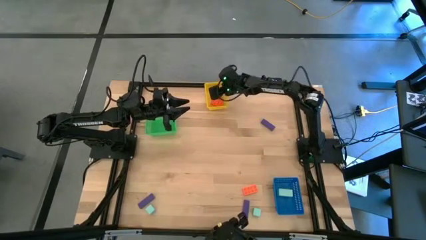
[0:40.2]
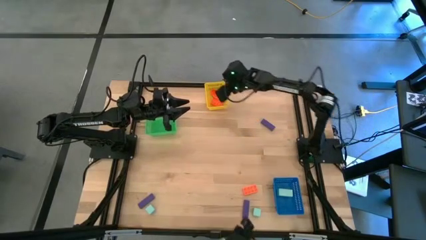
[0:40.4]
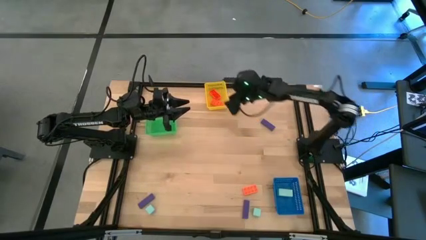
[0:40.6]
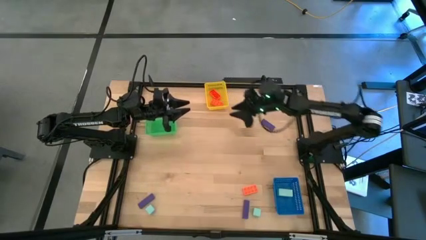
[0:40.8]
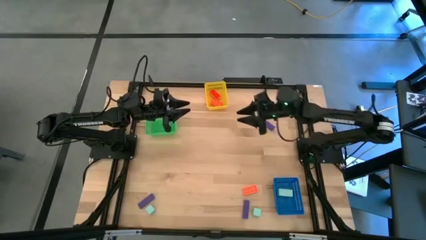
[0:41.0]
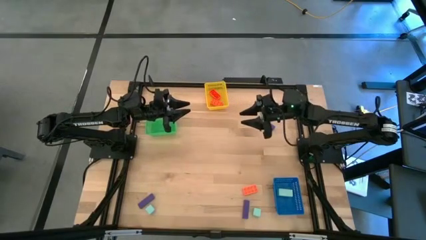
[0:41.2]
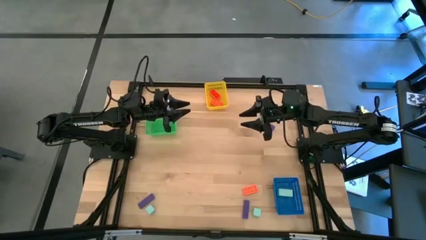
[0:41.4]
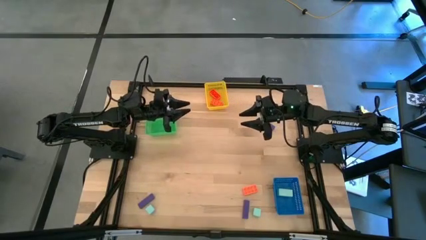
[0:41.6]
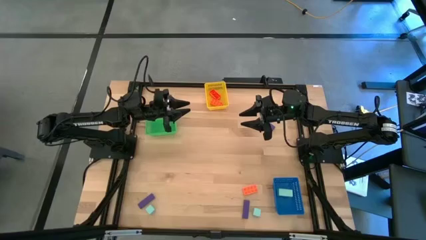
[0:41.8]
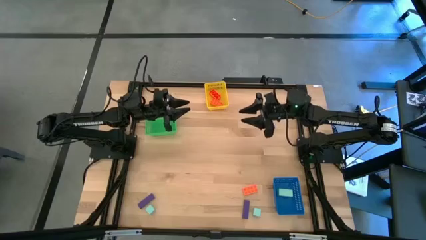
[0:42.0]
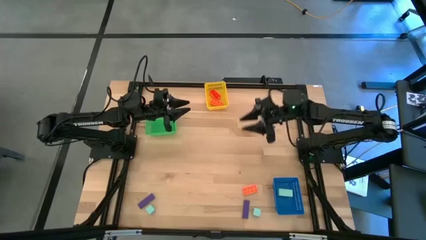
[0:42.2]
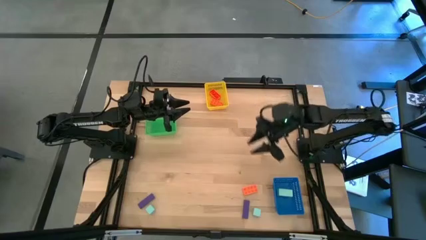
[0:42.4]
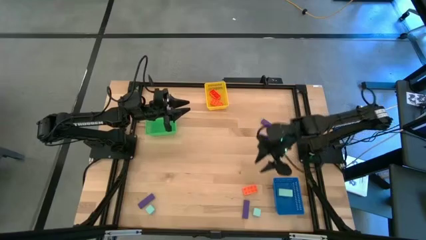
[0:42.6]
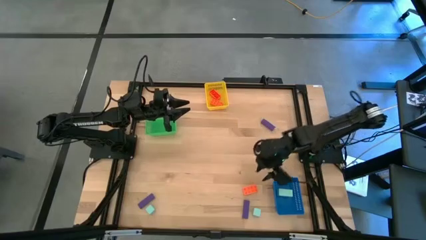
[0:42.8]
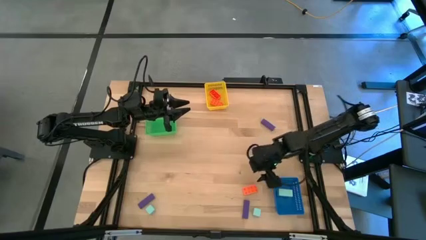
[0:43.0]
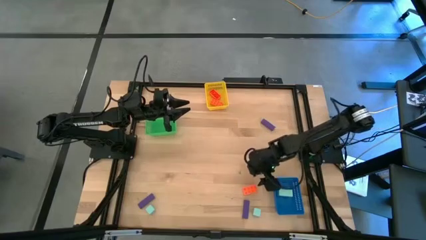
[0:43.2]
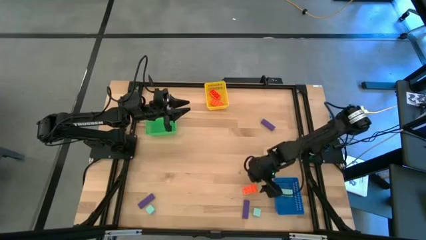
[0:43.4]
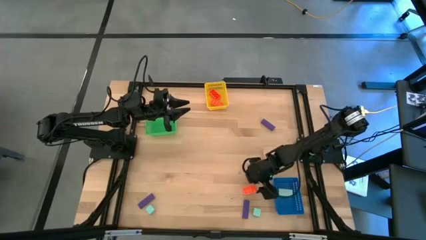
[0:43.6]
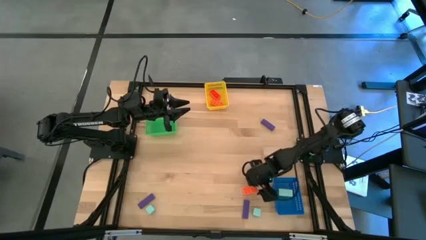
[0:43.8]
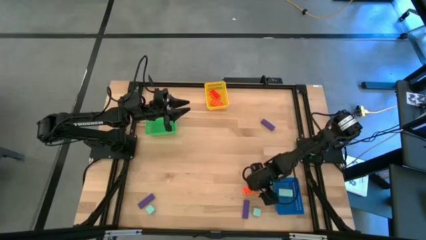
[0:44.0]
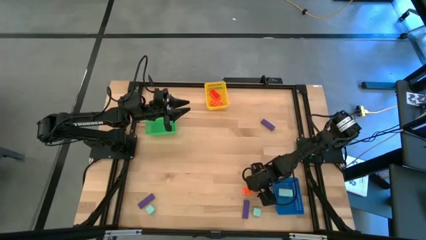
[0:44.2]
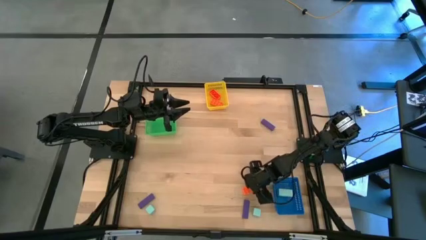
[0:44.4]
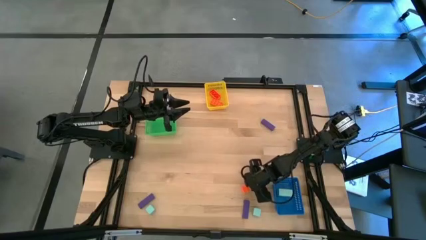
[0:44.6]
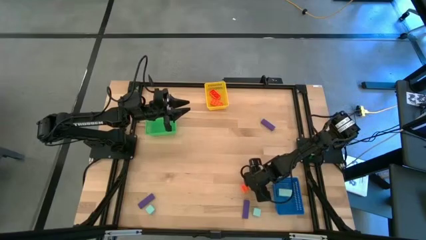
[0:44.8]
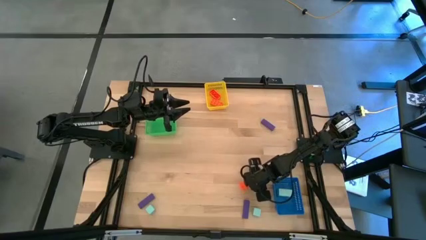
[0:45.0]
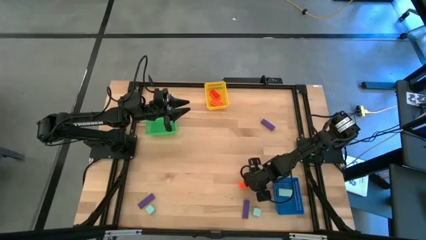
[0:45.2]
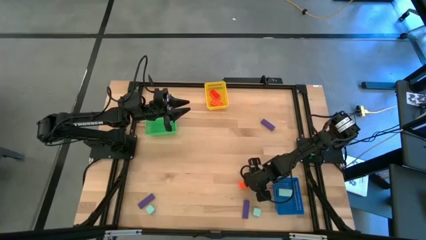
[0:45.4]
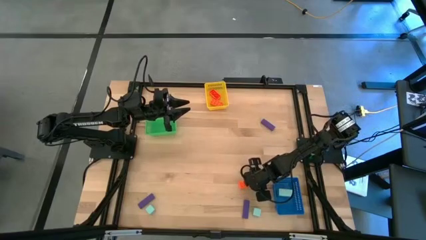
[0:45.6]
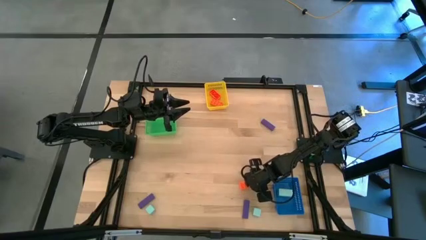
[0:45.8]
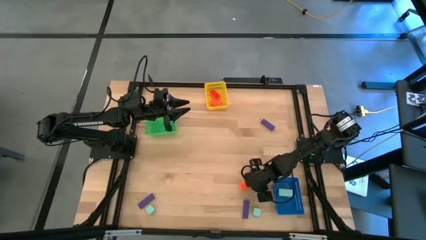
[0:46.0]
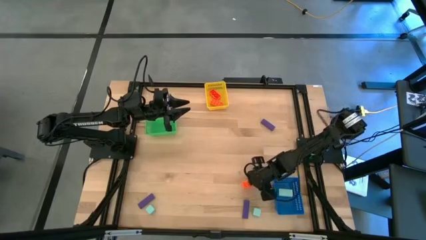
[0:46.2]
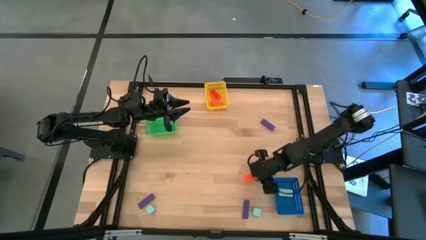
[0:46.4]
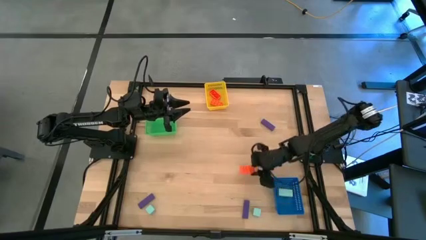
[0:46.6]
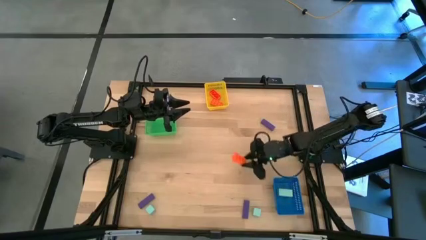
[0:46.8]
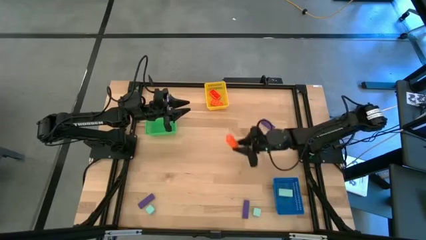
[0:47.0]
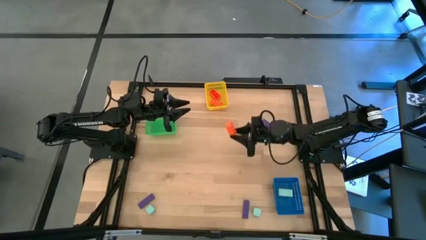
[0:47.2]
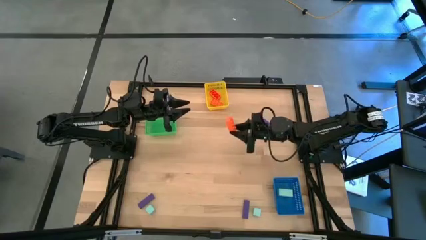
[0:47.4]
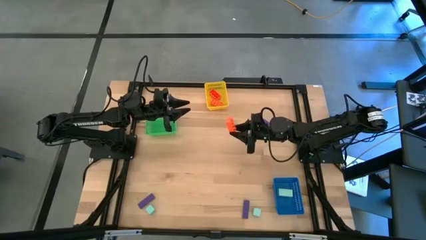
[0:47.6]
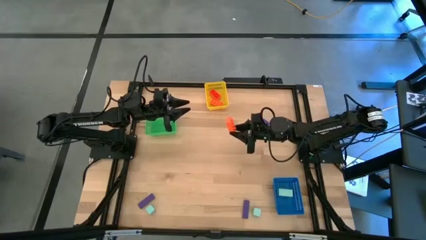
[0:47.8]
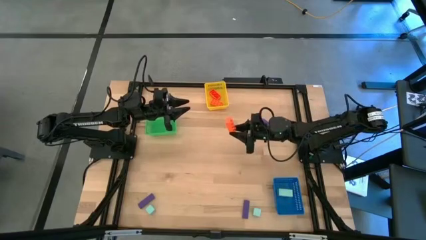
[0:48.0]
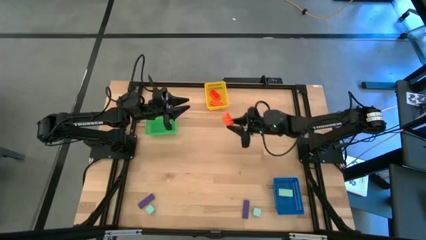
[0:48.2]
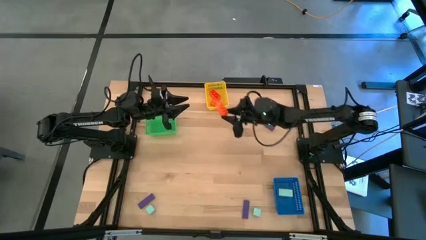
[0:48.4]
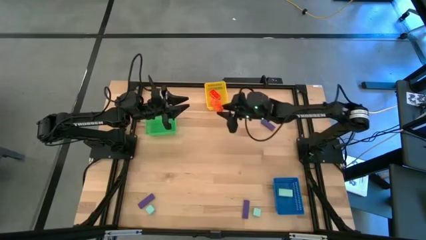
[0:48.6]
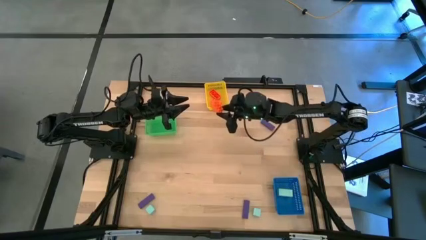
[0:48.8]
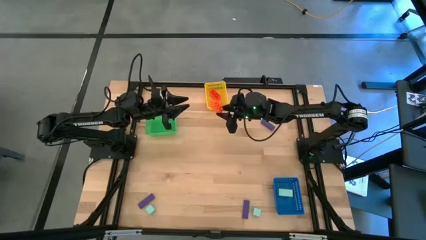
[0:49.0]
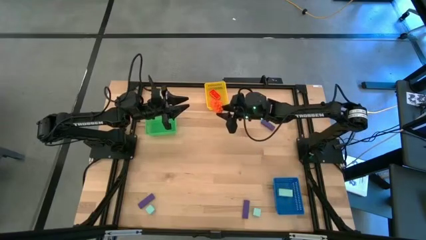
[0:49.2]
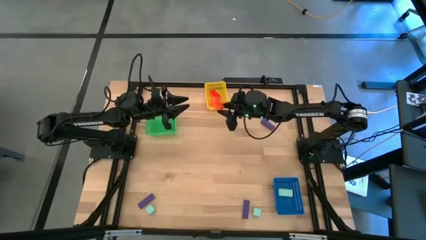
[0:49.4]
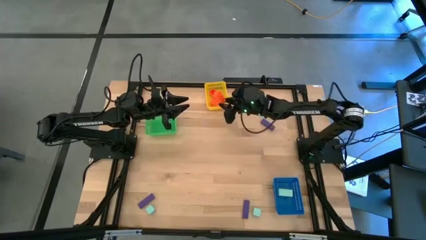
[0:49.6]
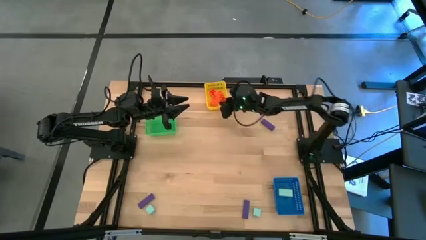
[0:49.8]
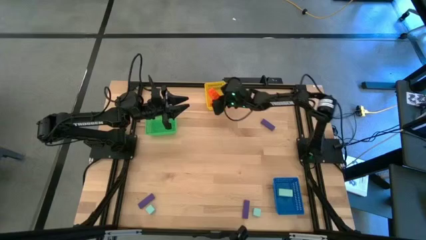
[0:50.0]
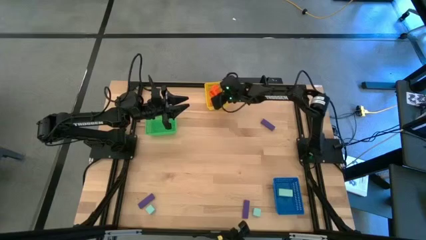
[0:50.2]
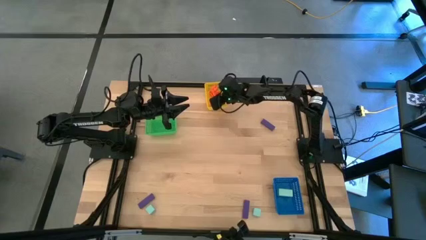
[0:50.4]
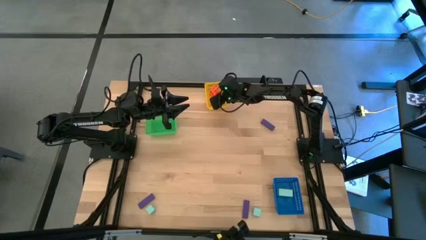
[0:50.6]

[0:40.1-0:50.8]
Task: Sort & place blocks by color
Put the orange game piece into the yellow bin

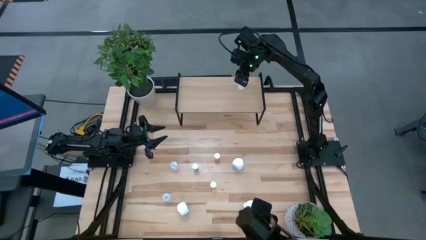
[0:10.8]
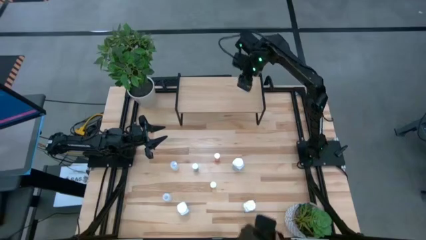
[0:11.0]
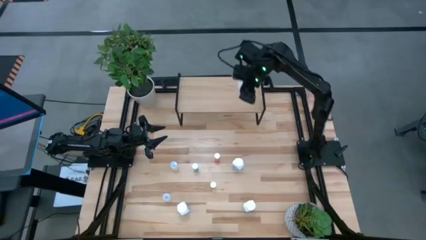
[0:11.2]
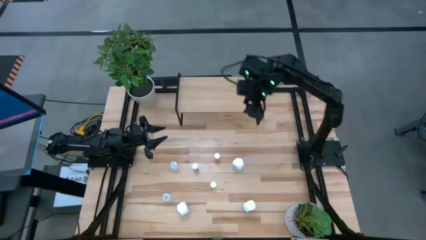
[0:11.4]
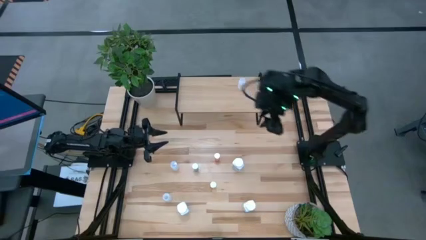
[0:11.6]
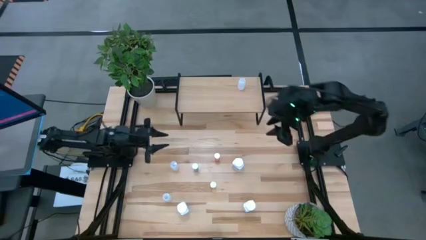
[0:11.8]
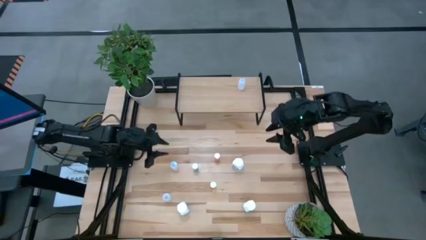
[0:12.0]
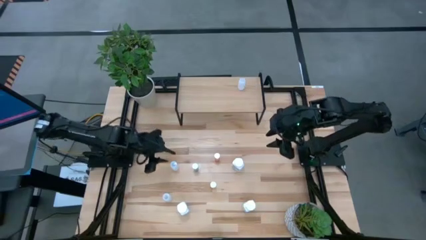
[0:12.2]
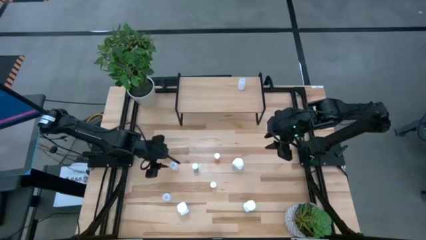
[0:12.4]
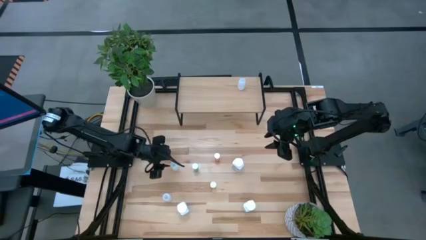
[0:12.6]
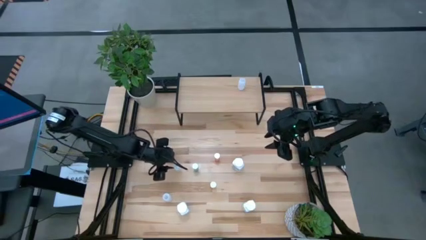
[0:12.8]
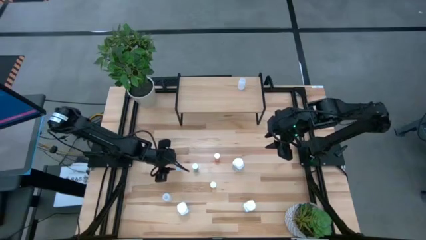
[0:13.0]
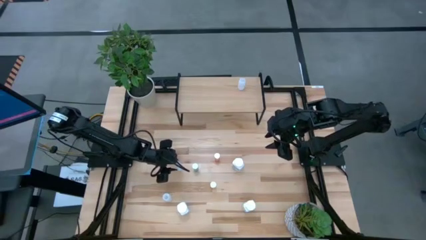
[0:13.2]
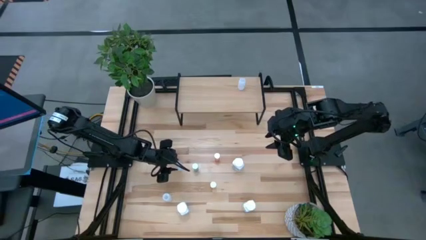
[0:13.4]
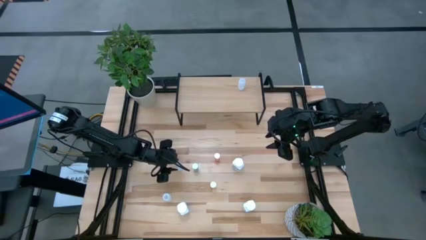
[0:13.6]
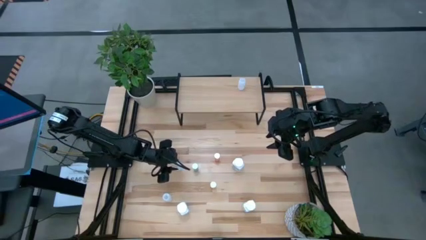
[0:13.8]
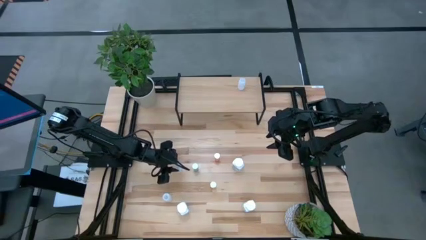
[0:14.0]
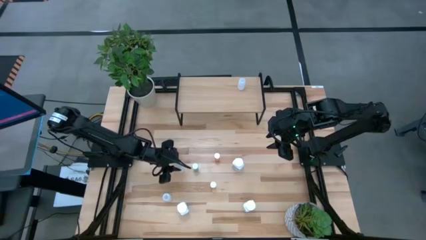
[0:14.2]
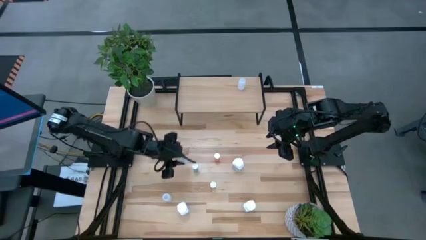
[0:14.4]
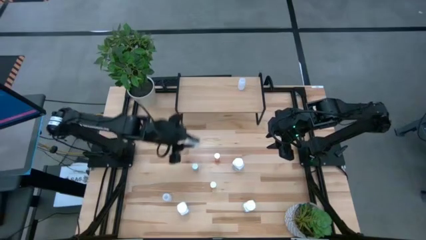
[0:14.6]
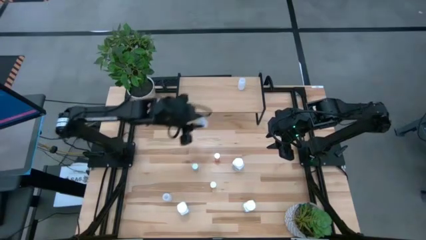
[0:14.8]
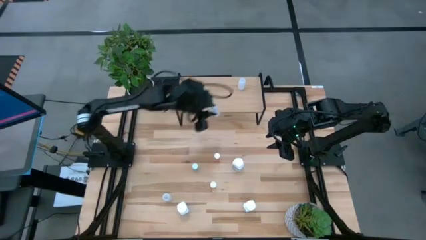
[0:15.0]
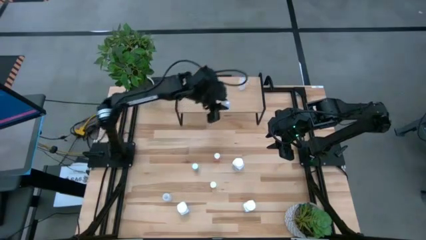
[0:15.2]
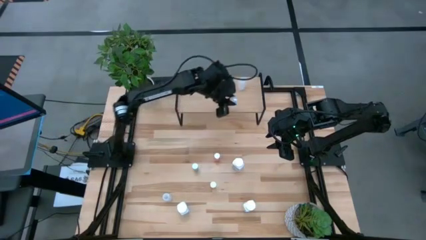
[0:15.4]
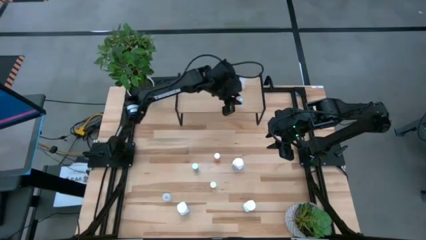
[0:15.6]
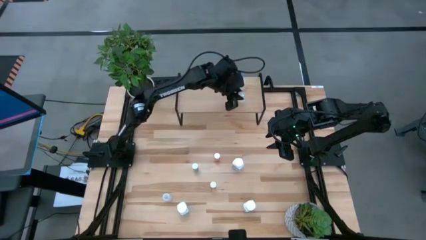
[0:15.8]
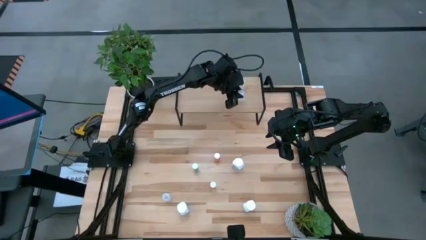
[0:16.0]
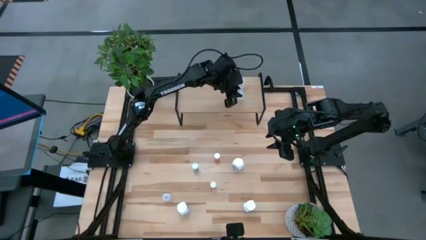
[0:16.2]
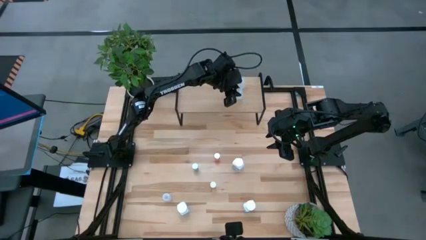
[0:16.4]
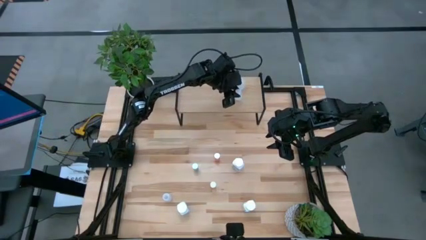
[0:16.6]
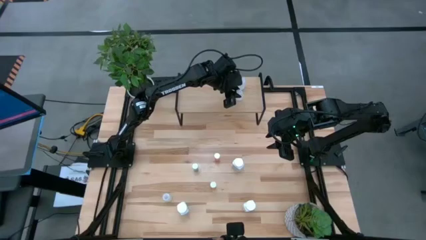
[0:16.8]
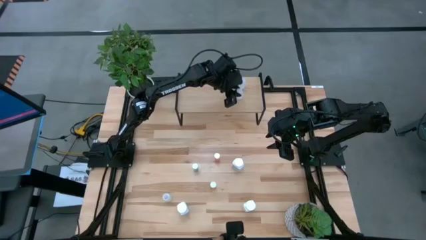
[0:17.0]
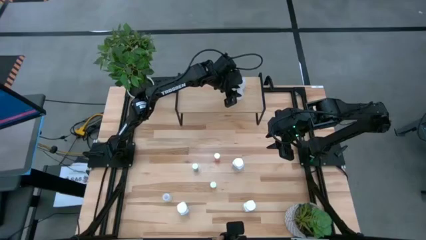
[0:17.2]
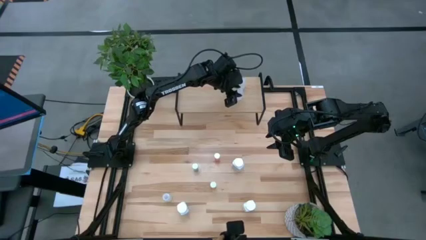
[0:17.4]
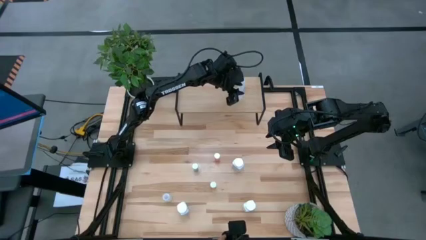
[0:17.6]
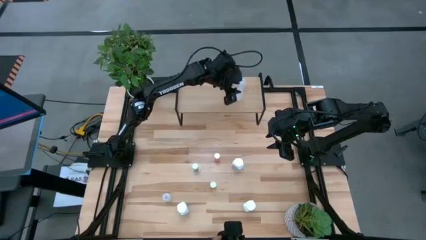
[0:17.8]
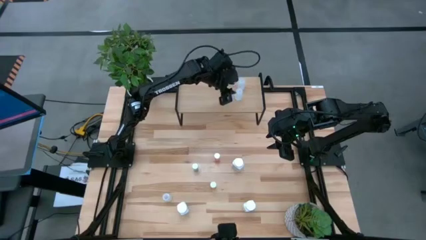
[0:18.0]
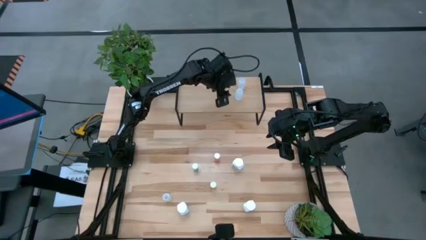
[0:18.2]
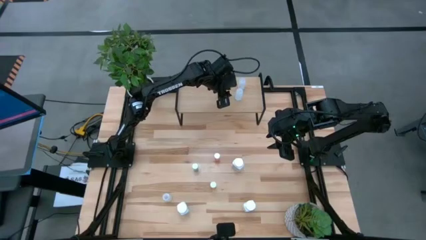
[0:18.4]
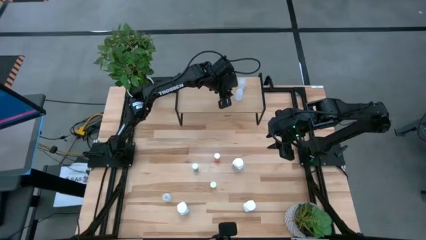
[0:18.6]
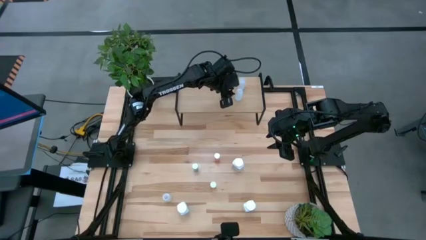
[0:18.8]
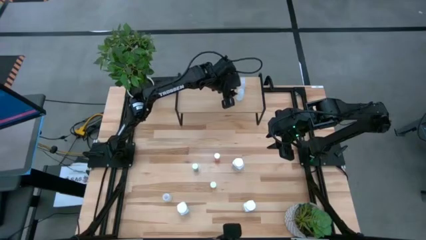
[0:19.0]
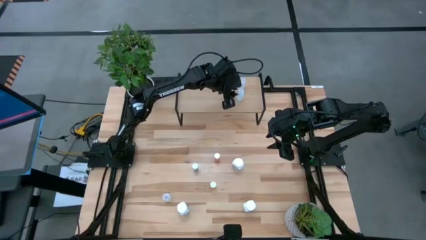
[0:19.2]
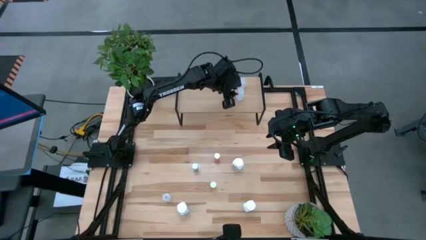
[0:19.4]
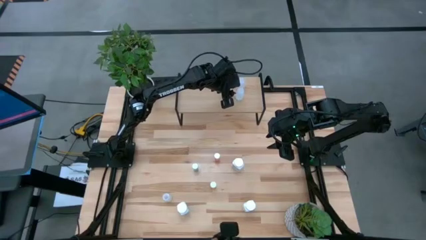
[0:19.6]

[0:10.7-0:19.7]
Task: Pick and place medicine bottles onto shelf by color
Put the top white pill bottle on the shelf aligned with the white pill bottle
